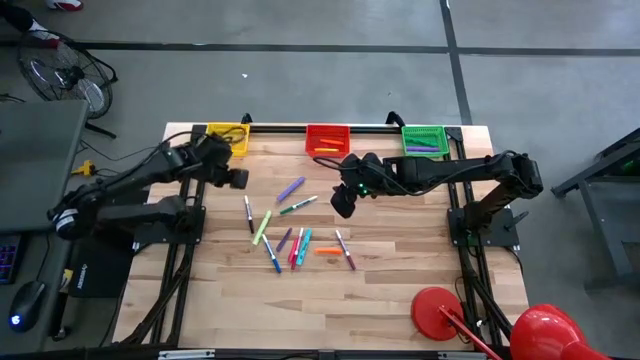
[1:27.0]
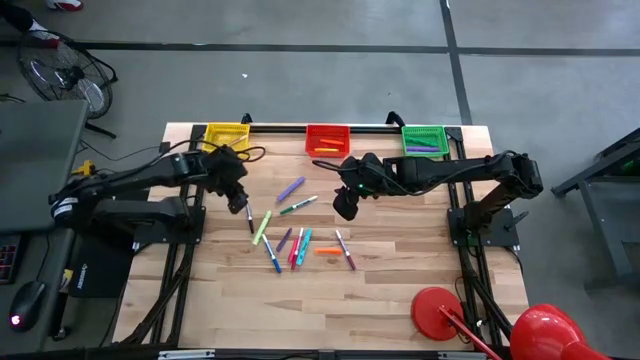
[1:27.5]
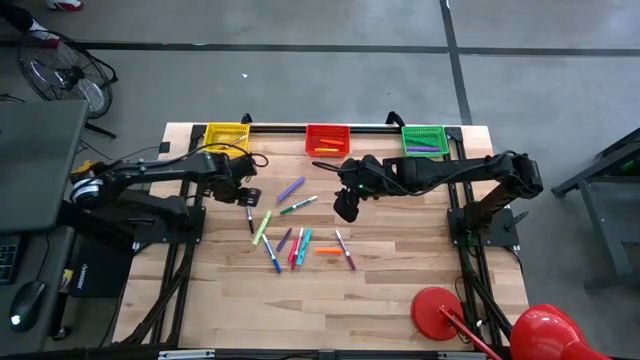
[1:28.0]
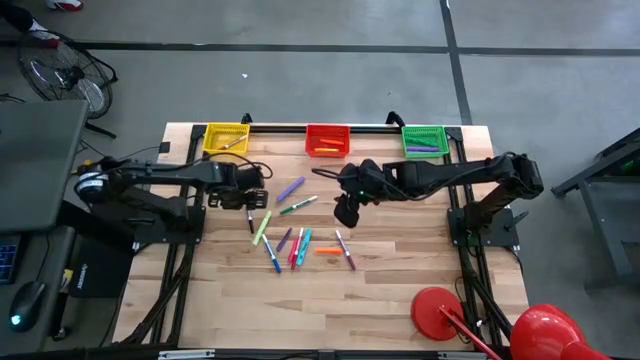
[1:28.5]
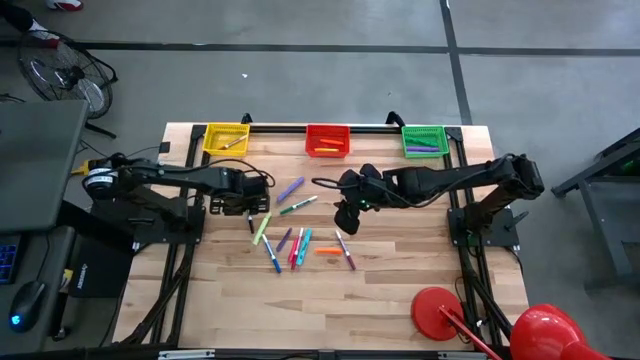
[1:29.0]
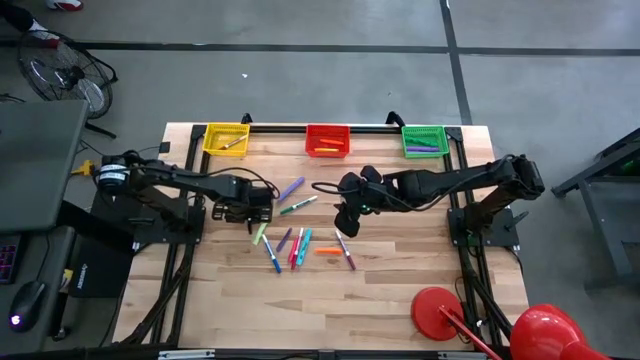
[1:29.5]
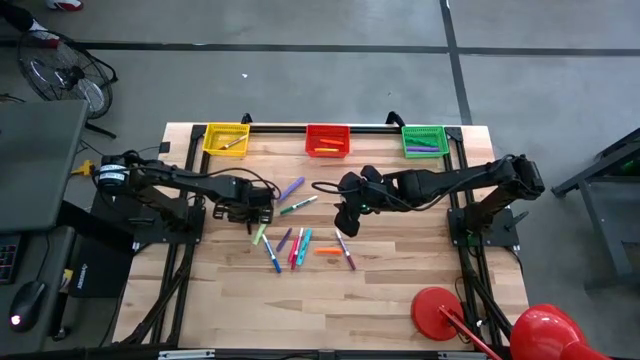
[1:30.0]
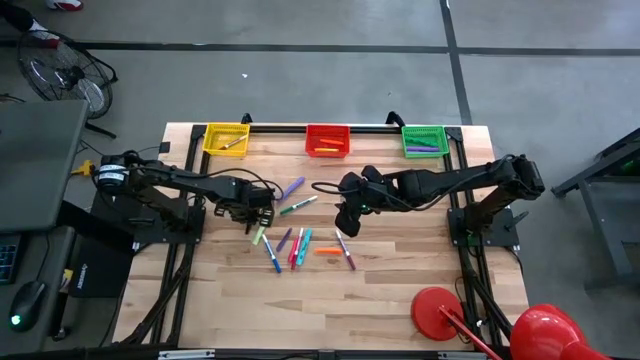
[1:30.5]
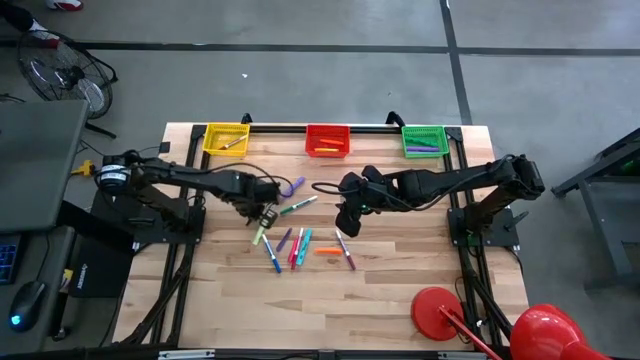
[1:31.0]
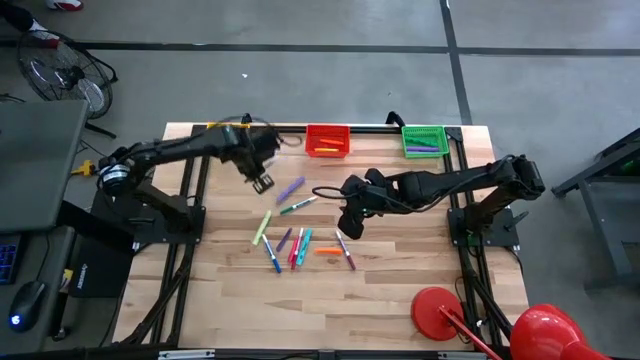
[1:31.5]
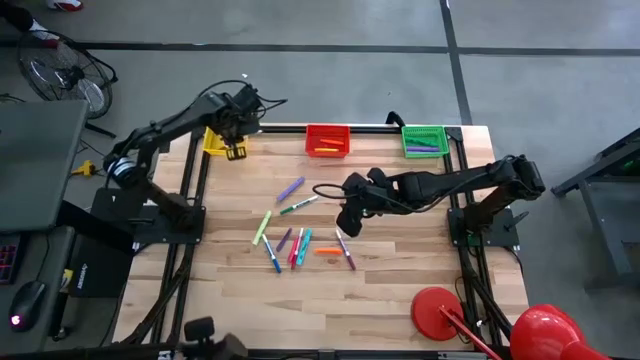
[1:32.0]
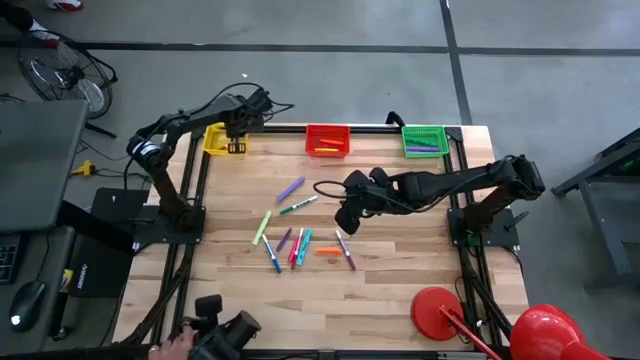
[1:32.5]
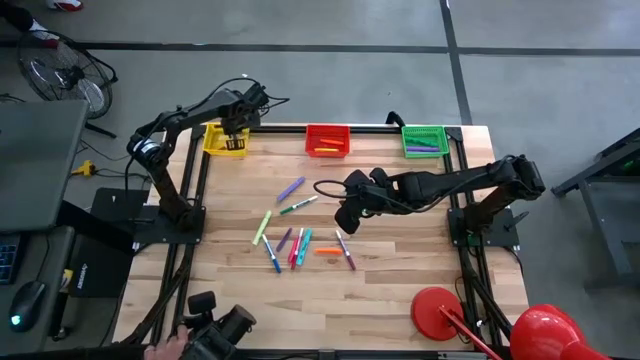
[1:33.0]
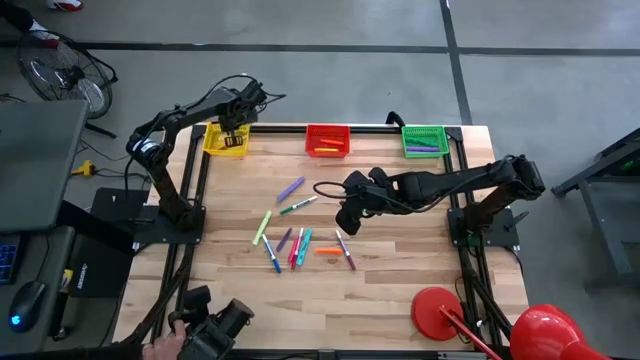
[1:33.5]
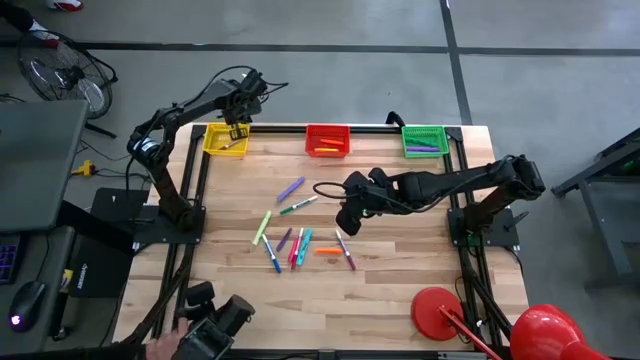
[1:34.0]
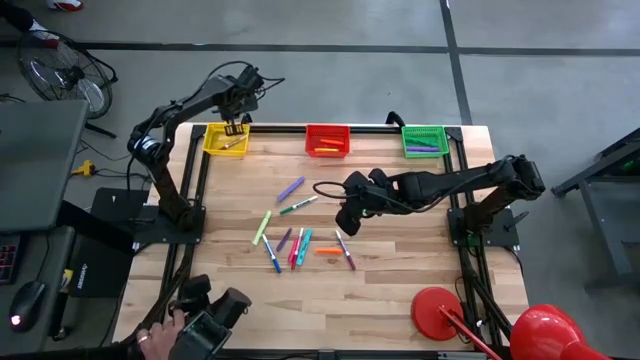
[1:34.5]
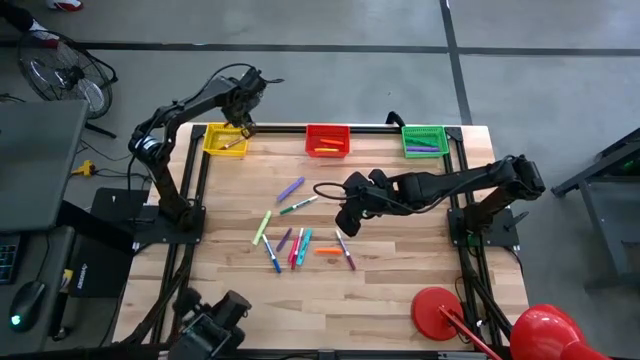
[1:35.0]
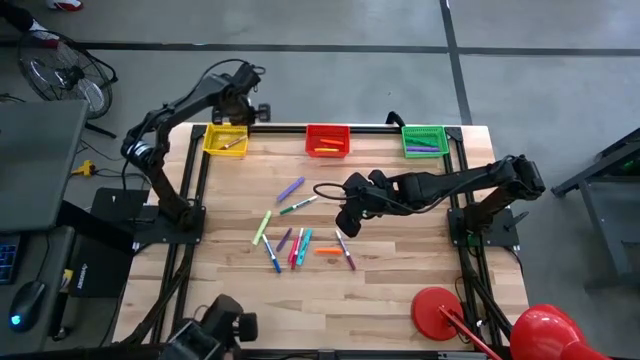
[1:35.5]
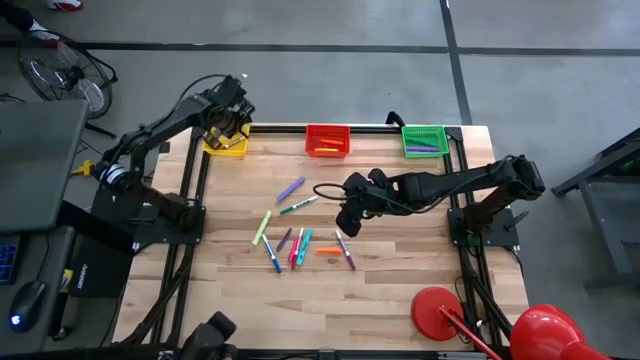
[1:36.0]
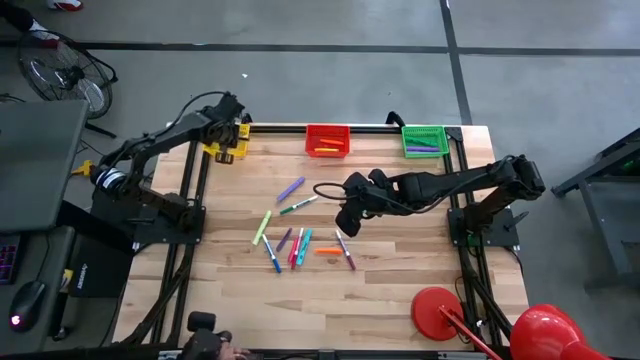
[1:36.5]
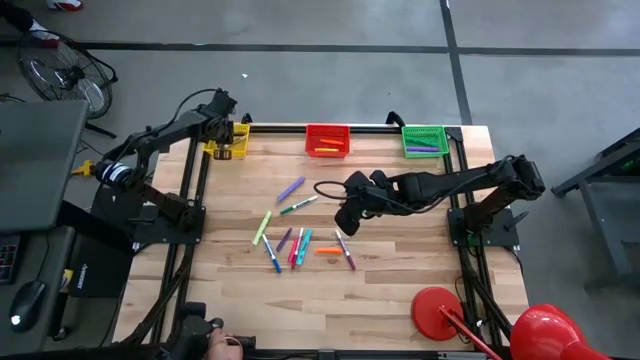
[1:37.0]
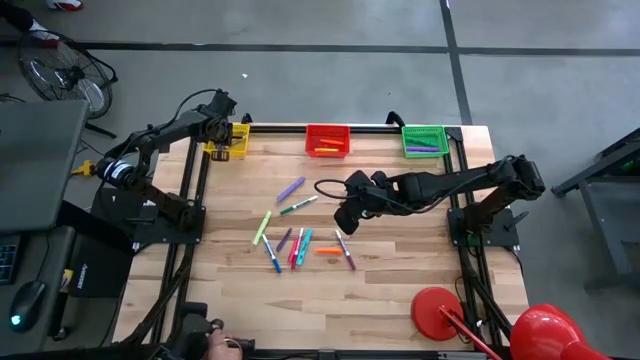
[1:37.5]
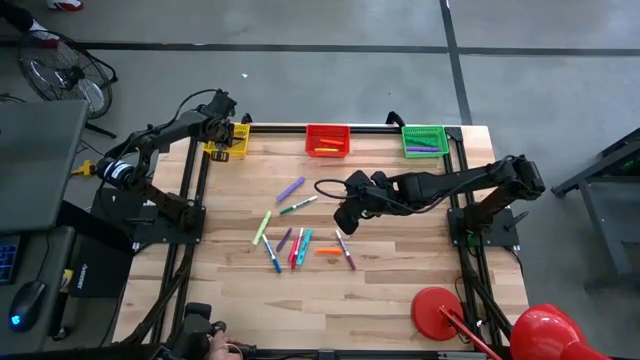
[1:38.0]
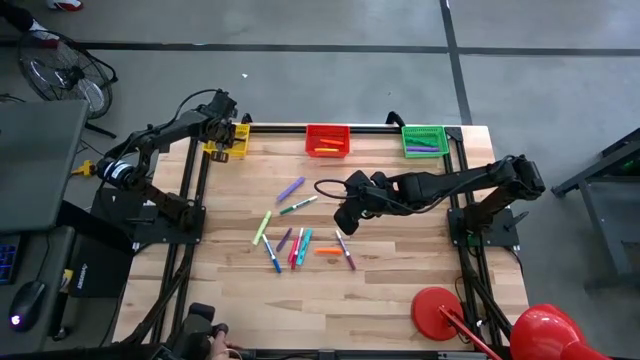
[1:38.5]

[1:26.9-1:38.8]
Task: Pick & Place Markers
Put the black marker into the yellow bin

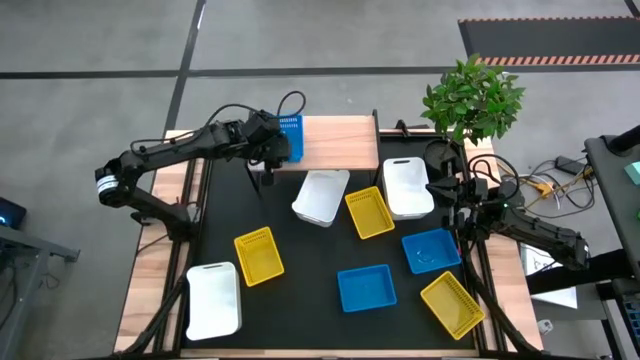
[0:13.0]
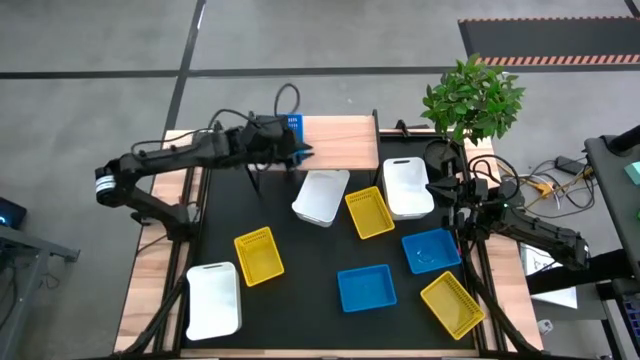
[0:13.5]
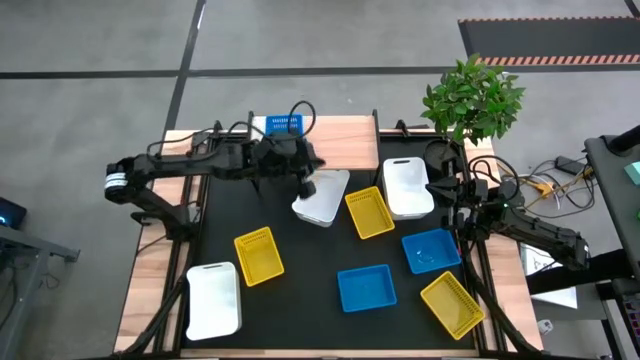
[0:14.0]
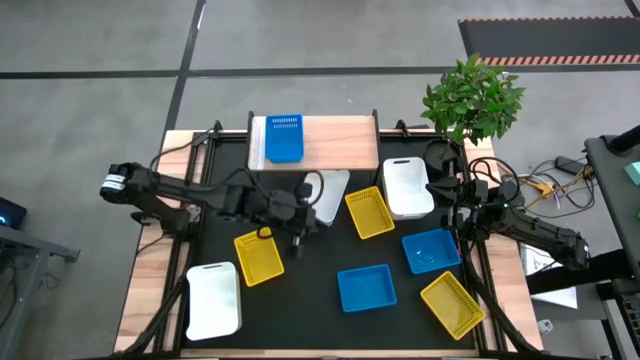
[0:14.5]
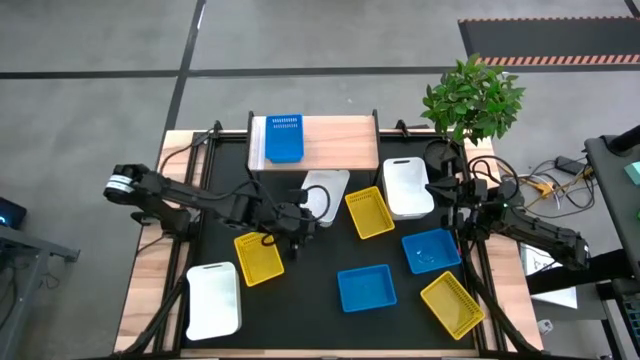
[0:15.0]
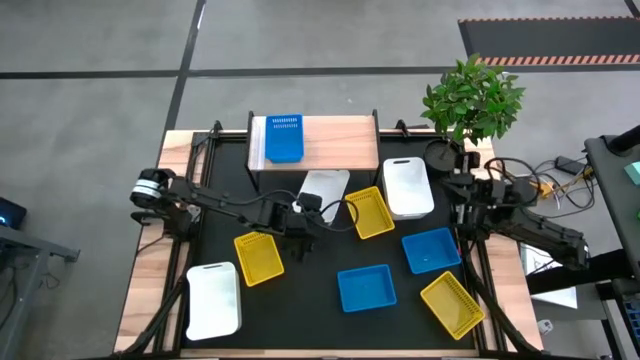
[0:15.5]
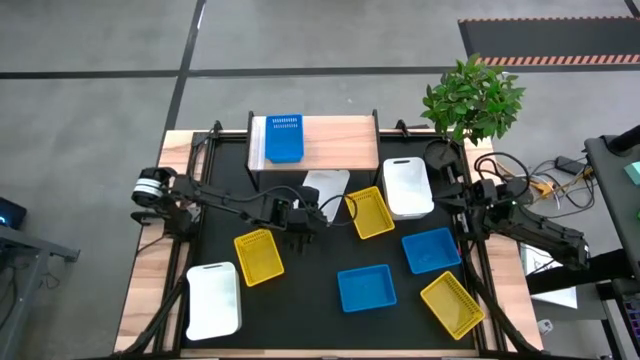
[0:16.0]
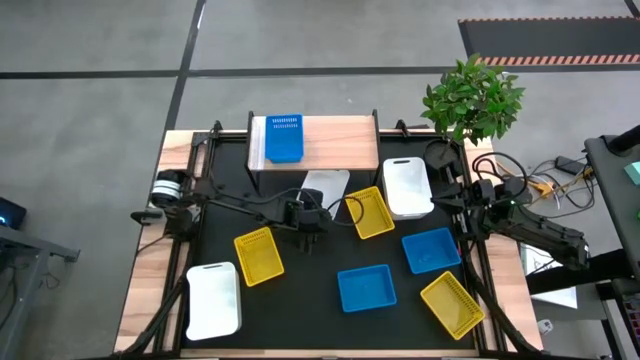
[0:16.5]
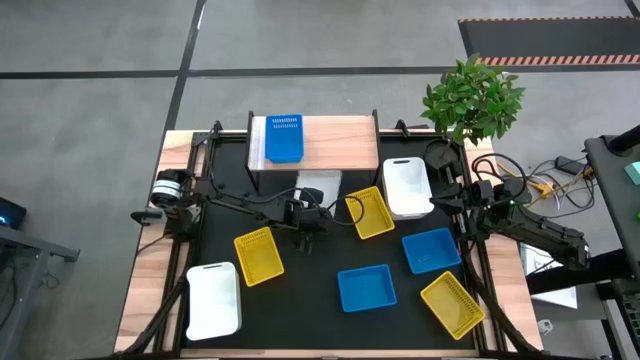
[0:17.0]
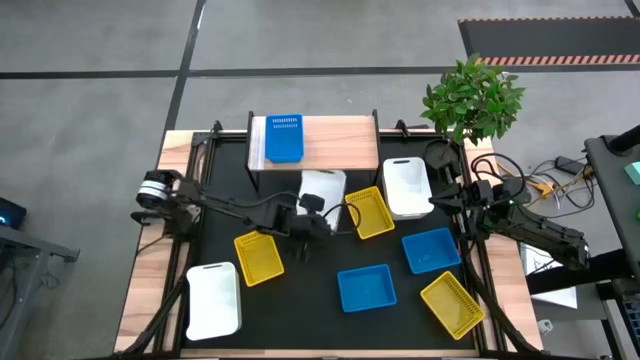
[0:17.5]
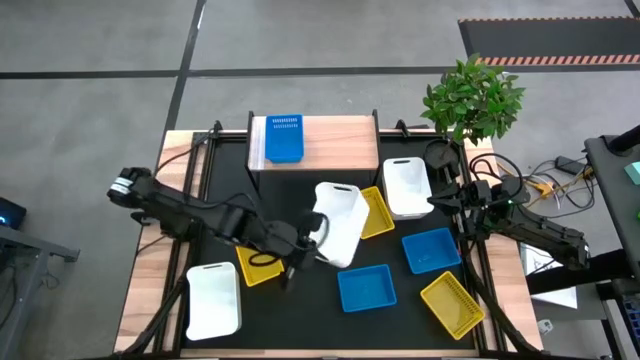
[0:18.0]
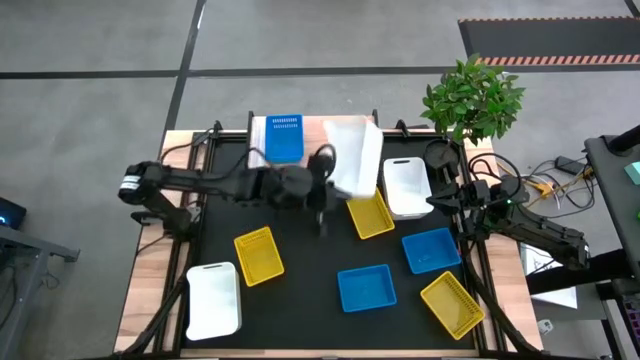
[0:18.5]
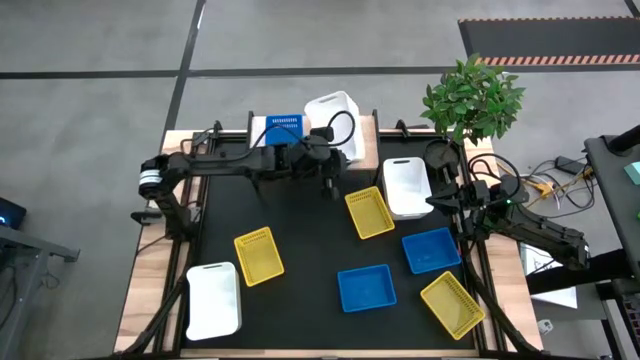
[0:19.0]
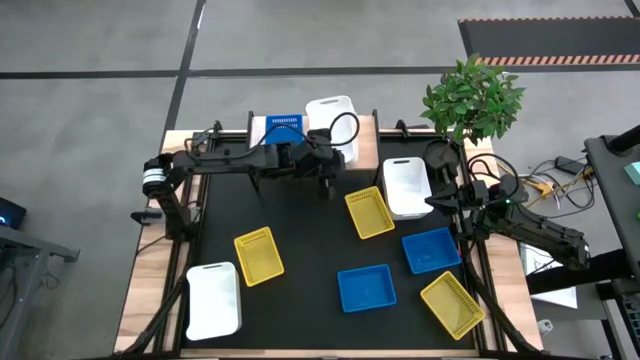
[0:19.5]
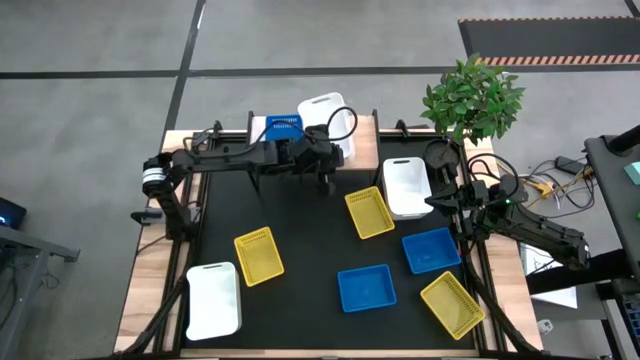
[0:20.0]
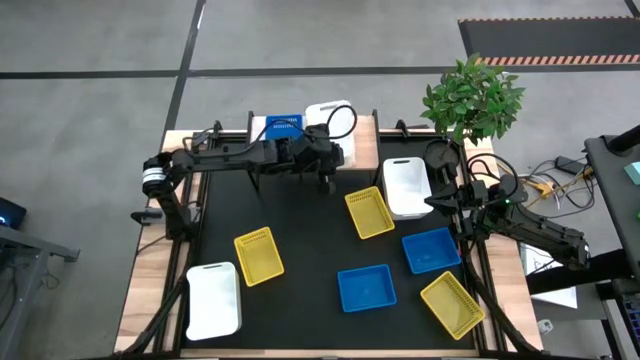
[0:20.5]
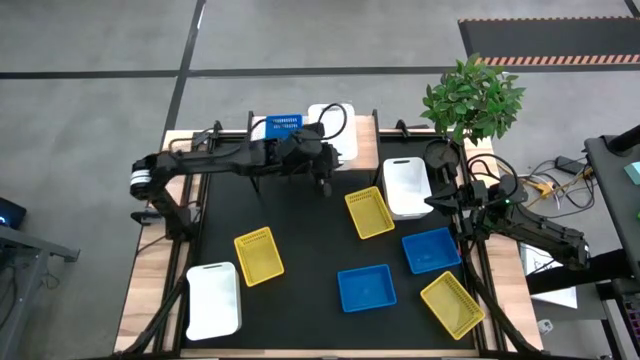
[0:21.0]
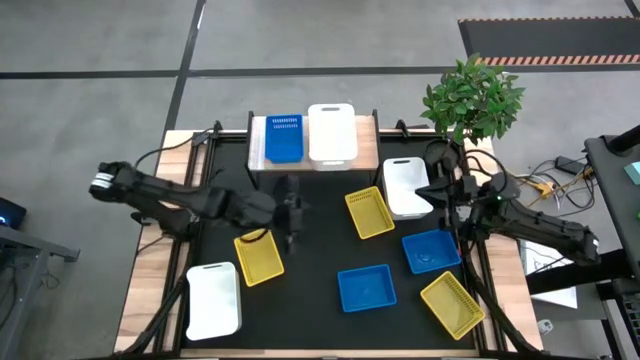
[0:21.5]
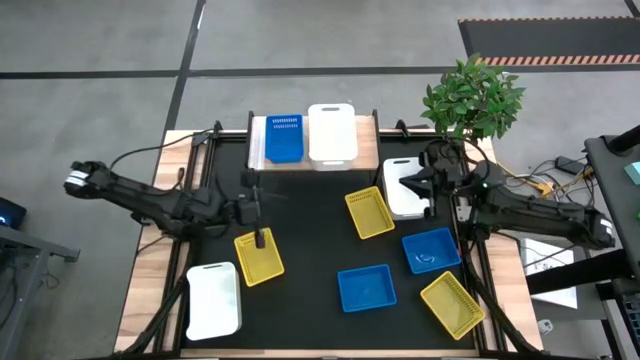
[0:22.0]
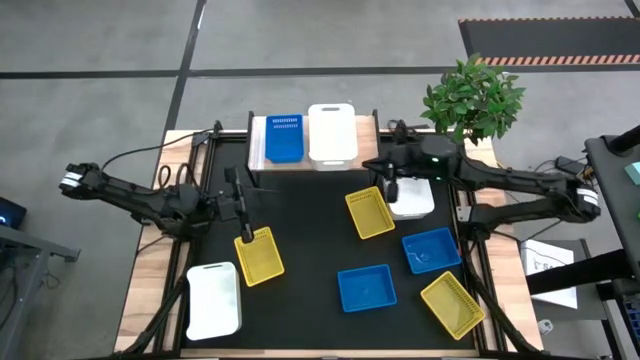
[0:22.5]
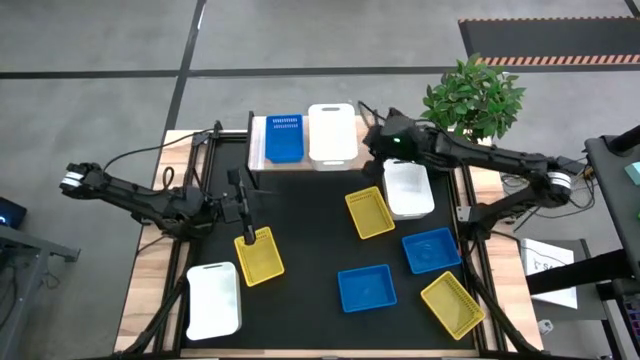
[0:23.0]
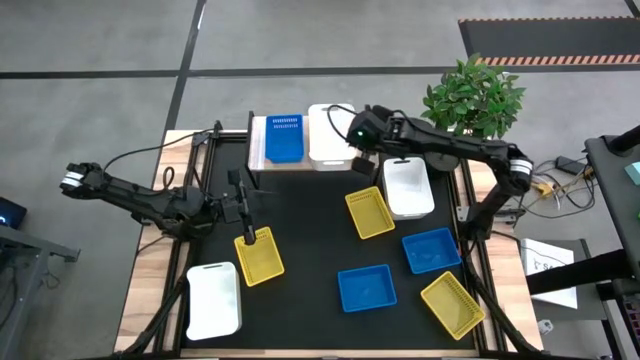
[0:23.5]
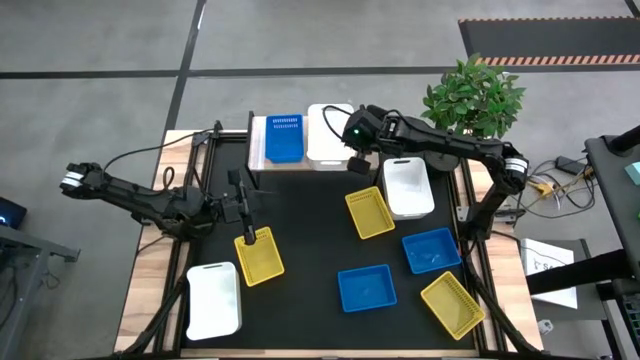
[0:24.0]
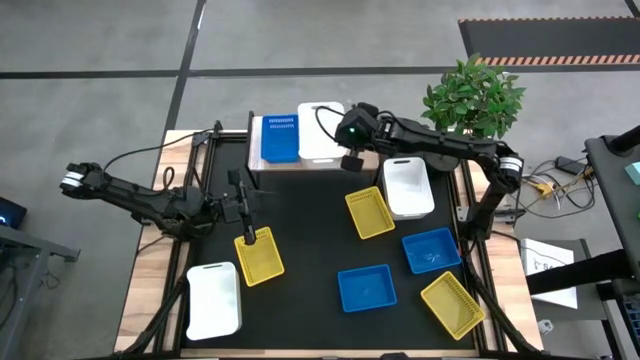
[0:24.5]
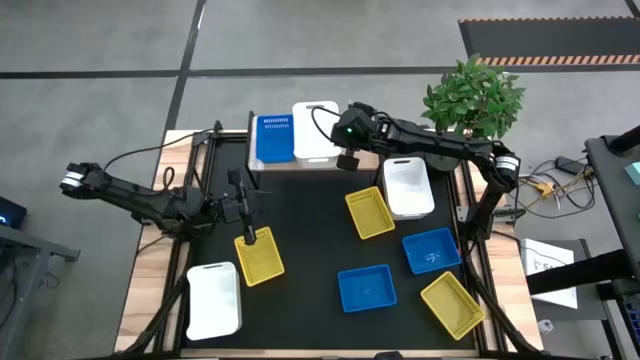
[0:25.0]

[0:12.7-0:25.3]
Task: Stack baskets on shelf by color
Put the top left white bin on the shelf
